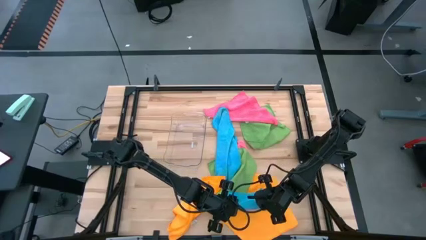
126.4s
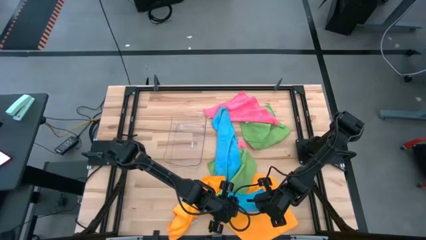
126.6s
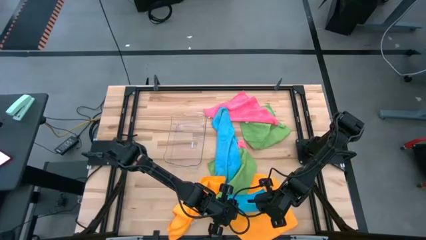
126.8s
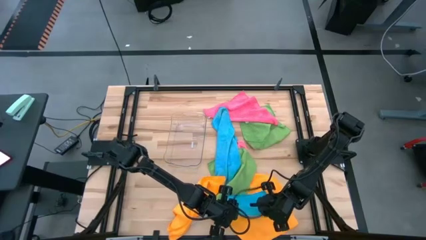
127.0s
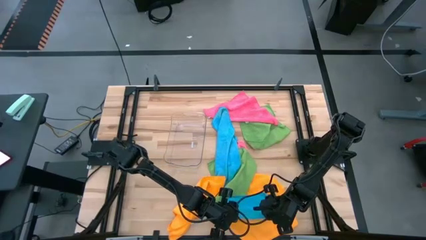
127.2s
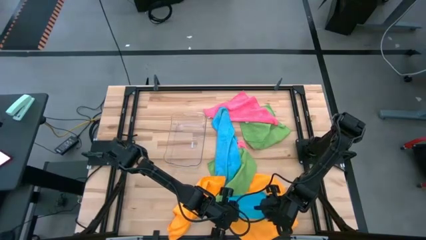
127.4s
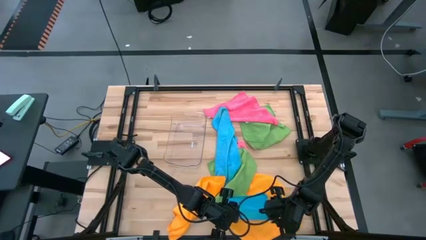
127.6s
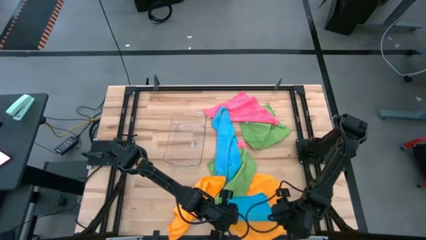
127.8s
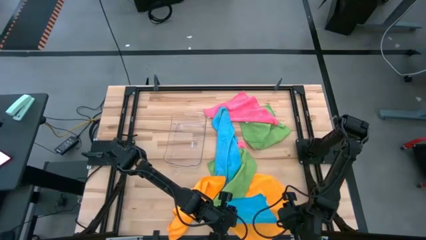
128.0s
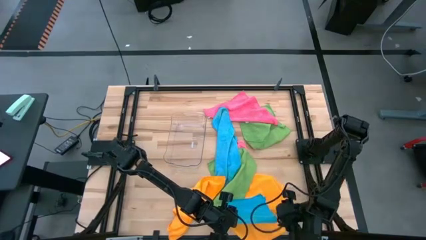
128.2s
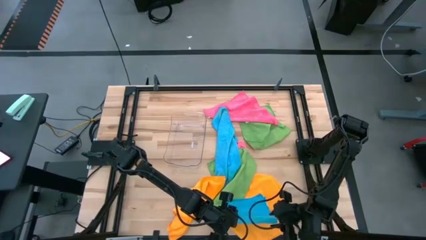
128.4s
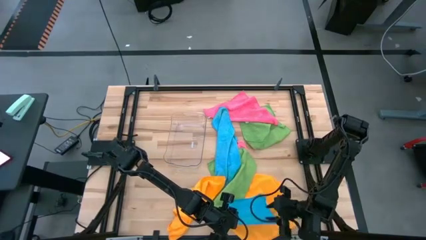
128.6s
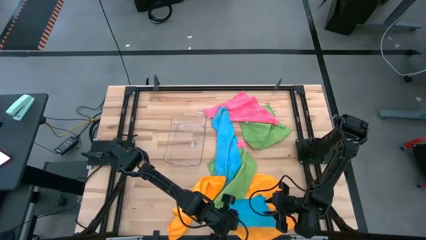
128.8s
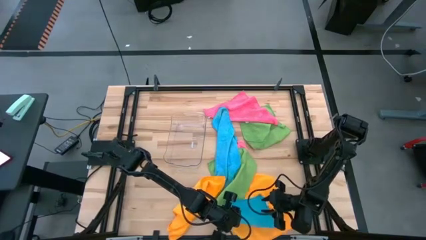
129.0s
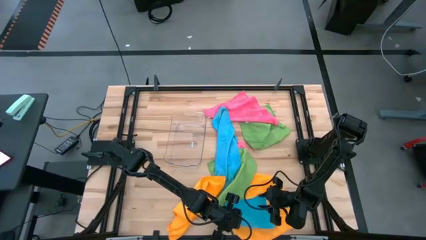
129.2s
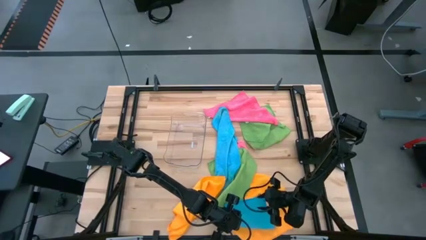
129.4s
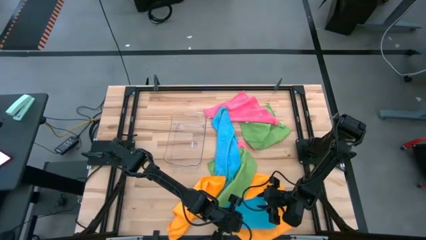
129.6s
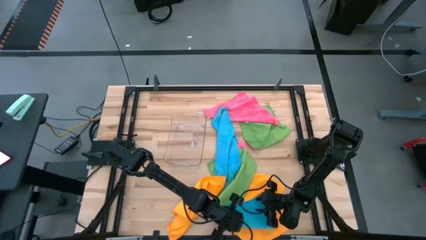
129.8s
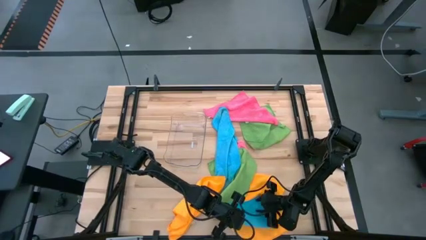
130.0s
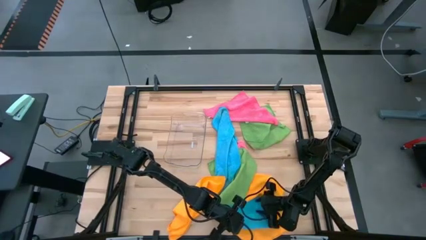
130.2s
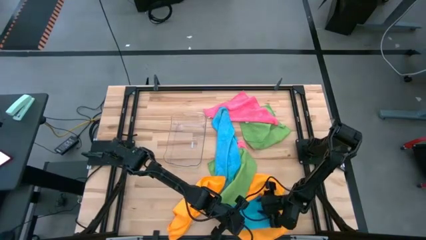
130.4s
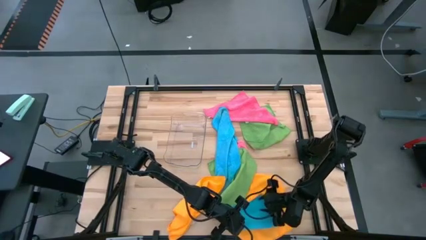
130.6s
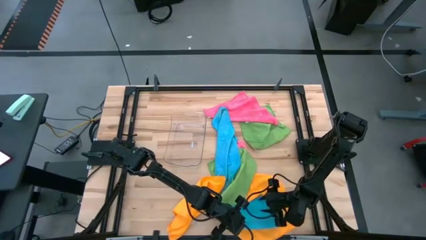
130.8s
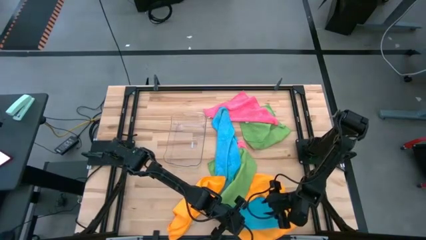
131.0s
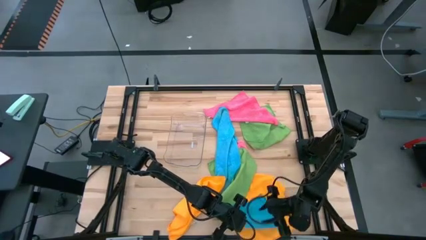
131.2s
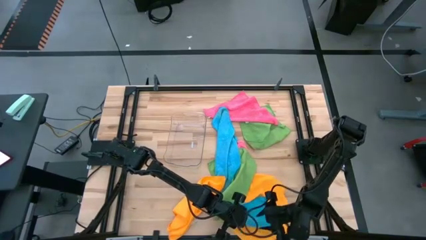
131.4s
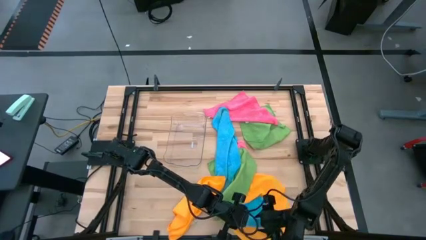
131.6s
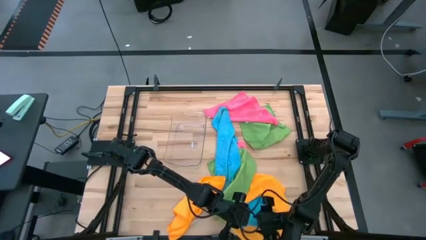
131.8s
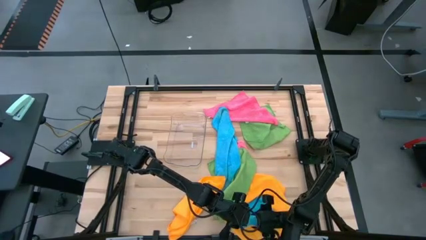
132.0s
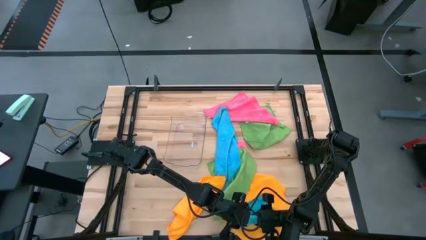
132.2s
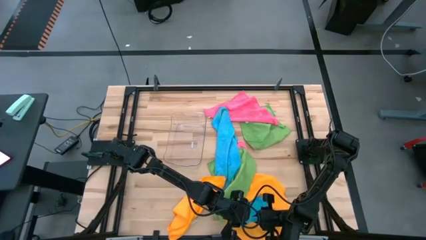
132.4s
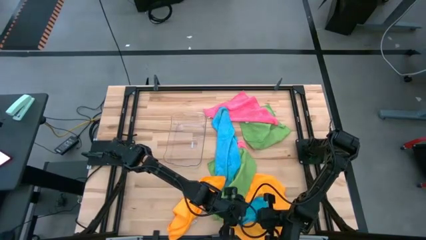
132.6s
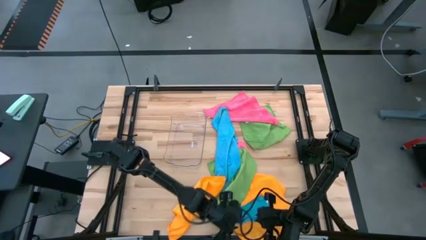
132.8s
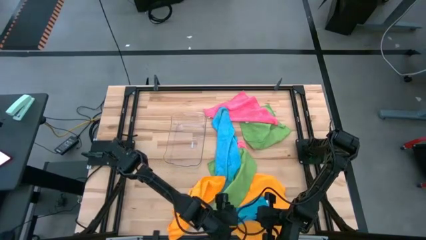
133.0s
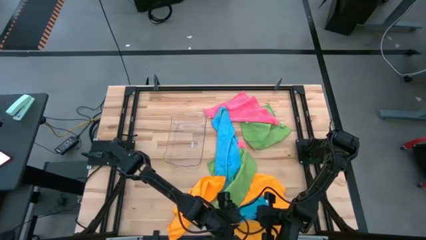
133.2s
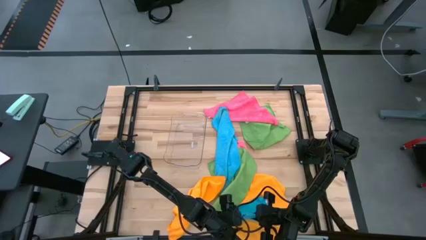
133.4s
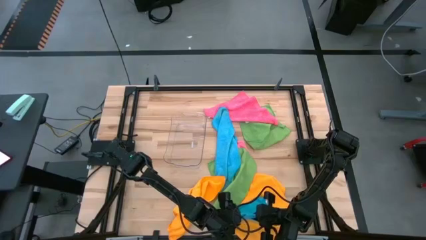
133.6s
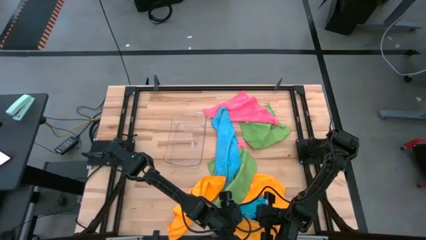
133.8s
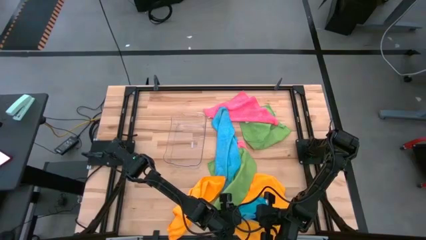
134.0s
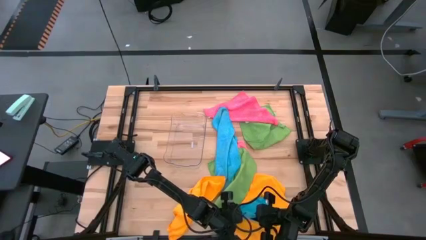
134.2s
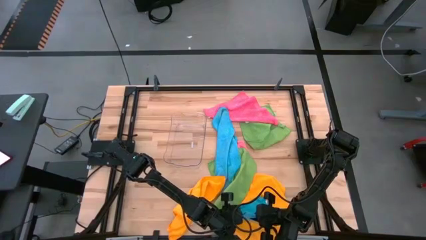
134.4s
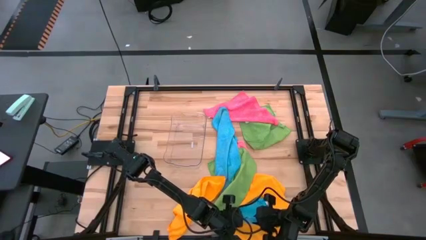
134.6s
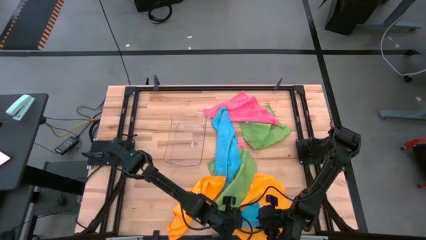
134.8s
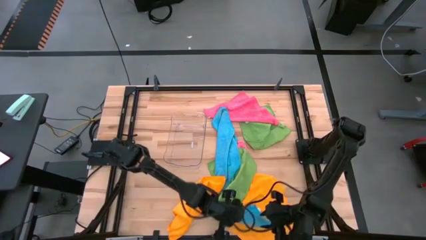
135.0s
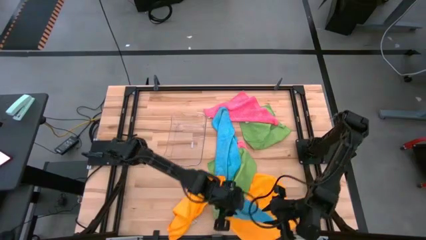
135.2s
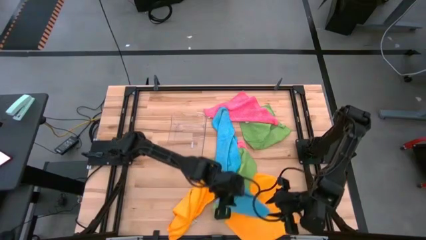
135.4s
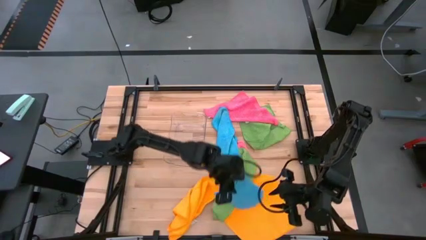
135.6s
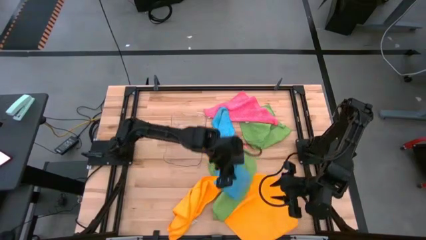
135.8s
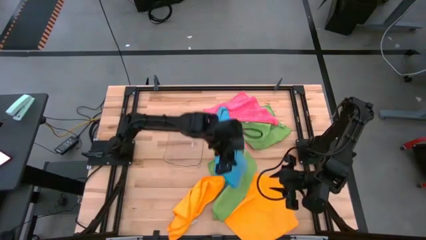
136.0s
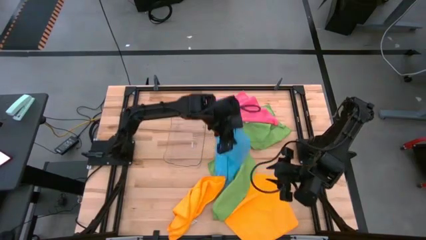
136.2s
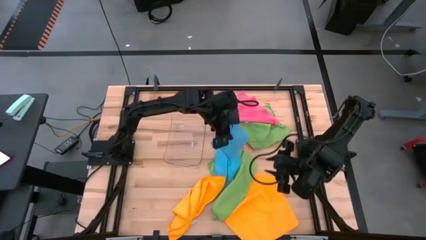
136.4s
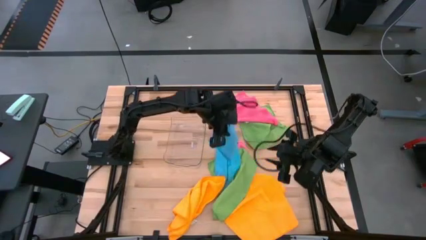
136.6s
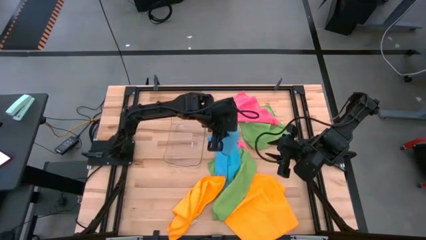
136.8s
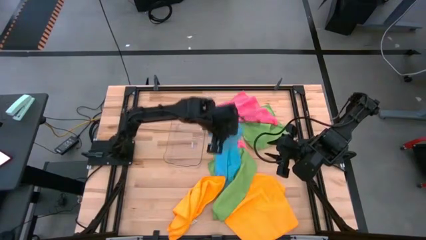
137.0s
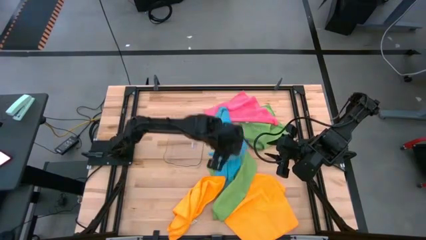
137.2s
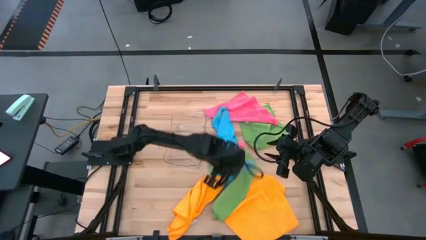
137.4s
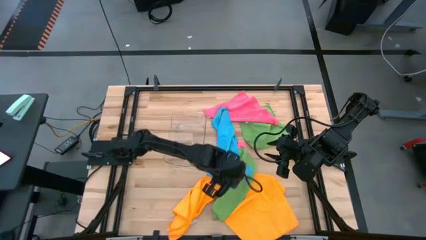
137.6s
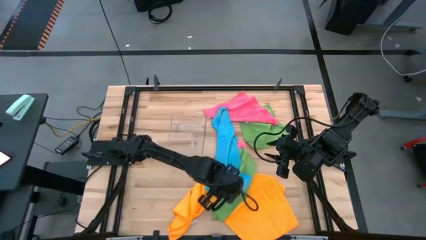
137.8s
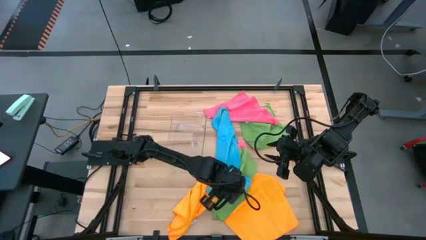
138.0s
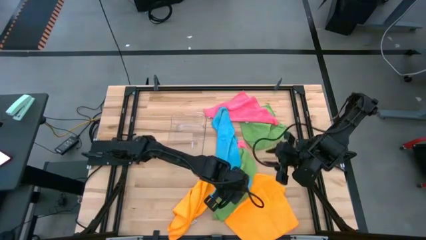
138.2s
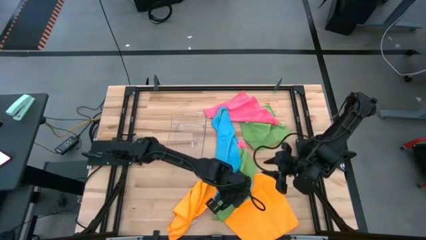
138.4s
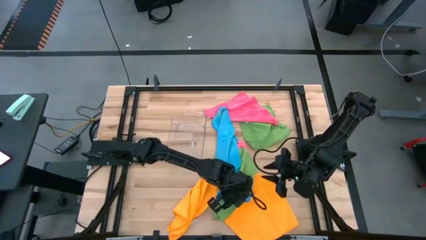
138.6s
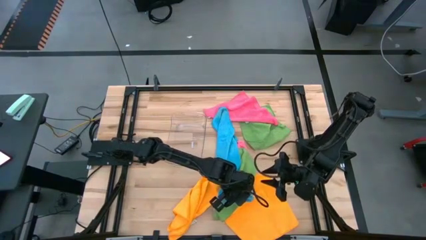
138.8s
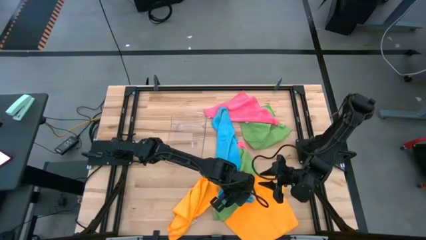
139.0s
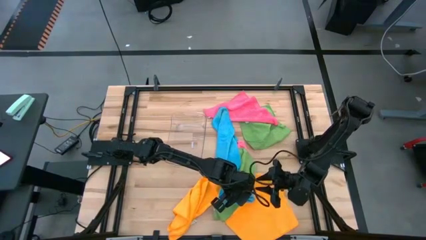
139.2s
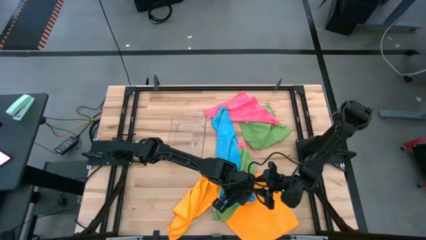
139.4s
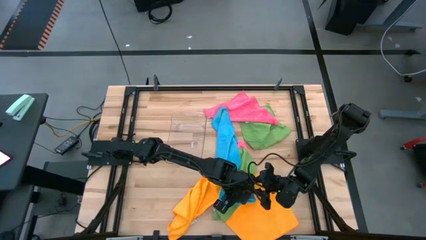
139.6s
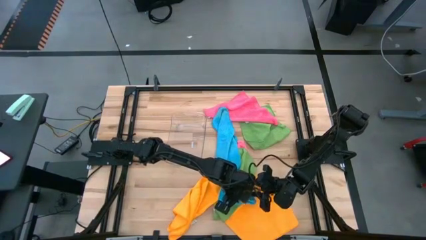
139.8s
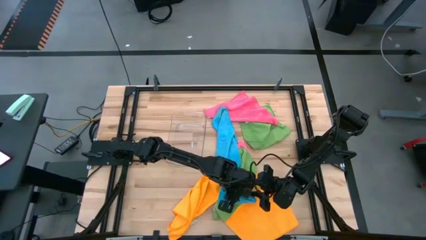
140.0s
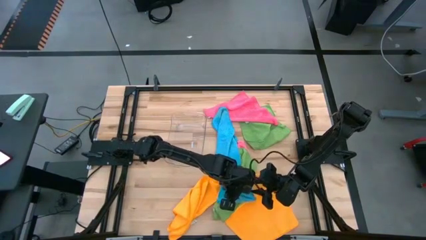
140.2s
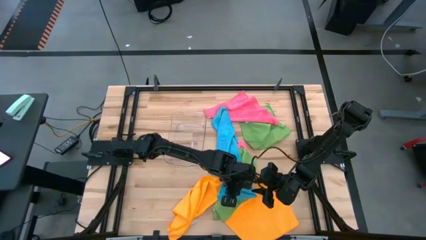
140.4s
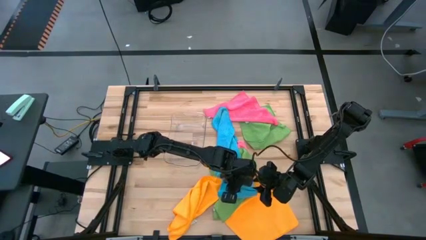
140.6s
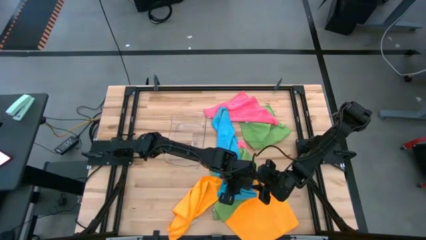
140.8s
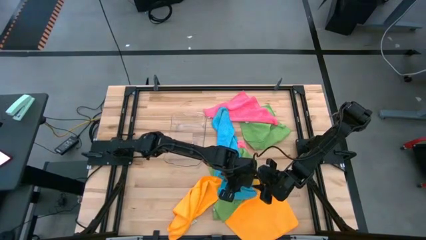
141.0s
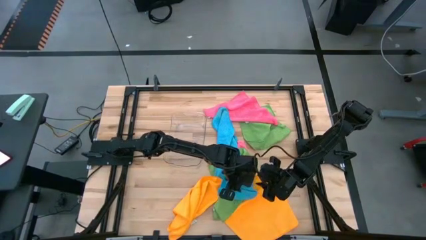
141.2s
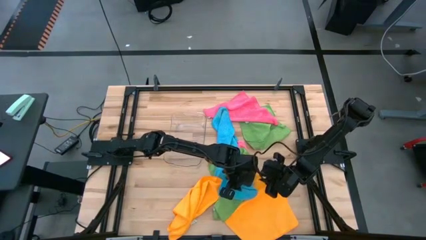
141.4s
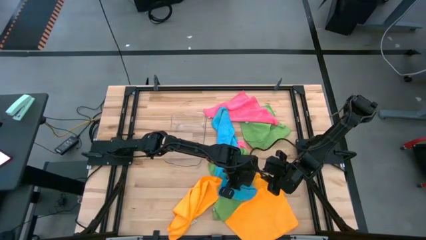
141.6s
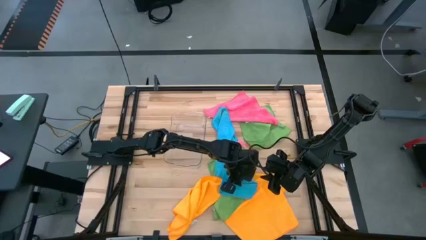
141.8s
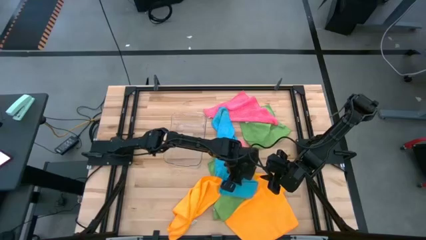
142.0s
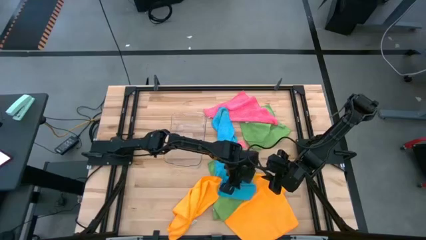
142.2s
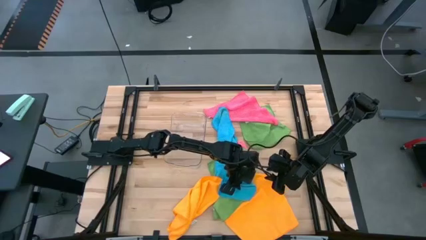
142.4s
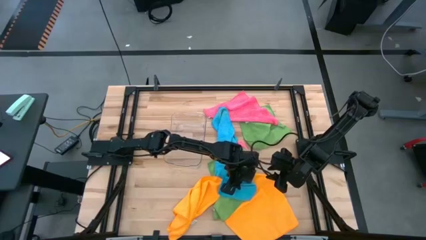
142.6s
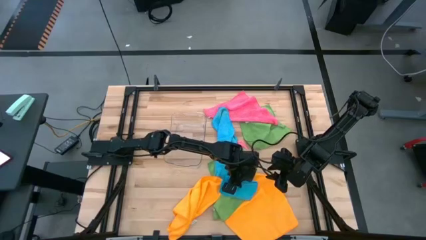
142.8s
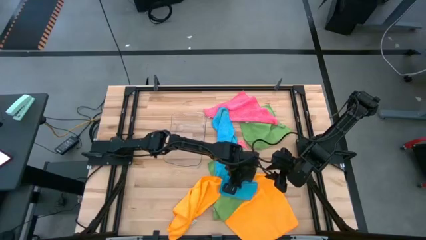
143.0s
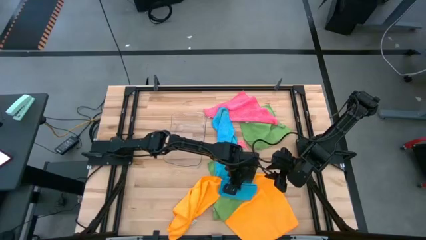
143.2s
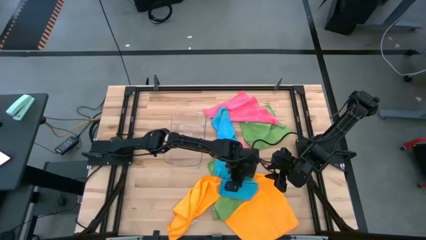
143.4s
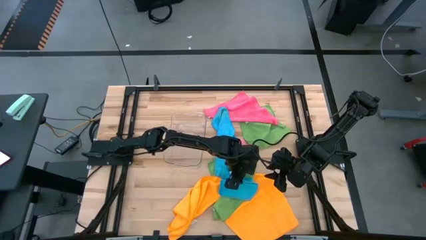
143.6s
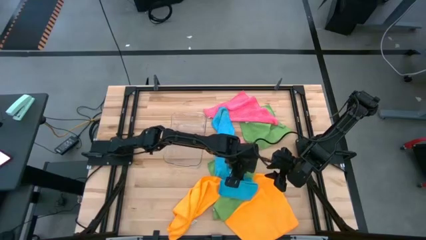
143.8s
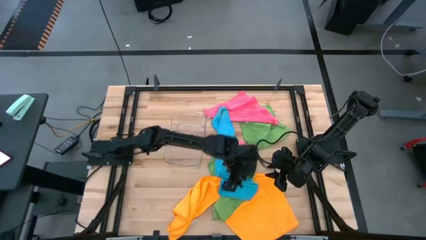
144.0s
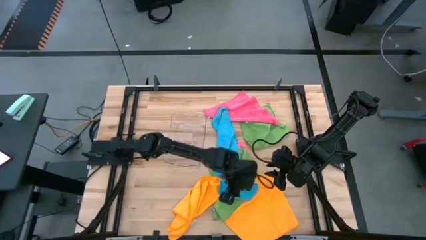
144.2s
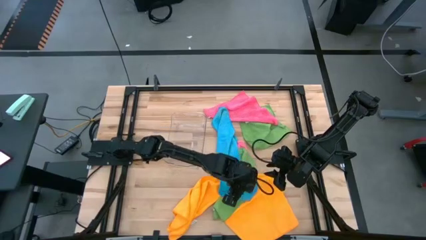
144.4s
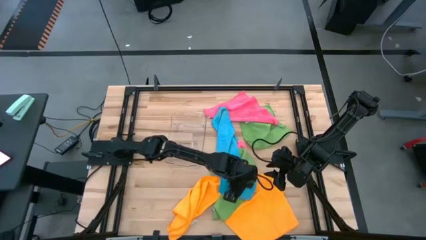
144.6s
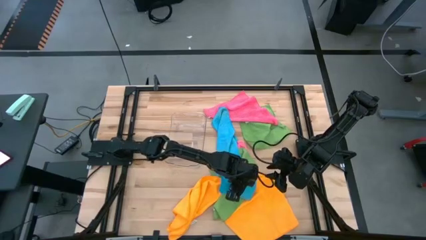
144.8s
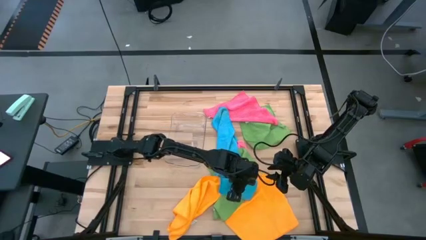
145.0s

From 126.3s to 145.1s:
Task: Fold microfiber towels
Fold the left blue towel
